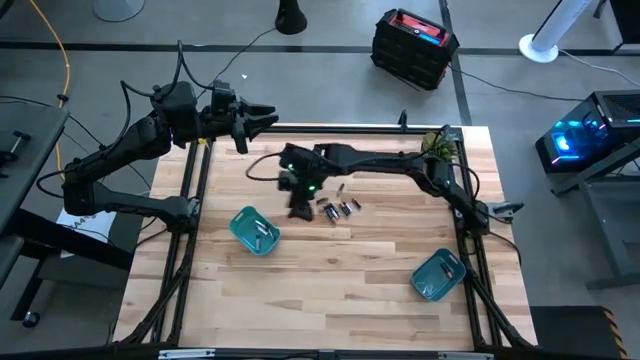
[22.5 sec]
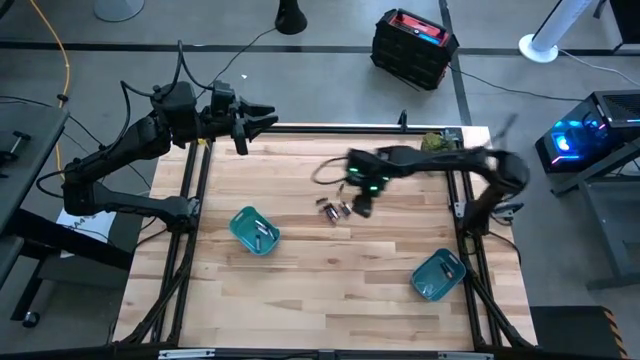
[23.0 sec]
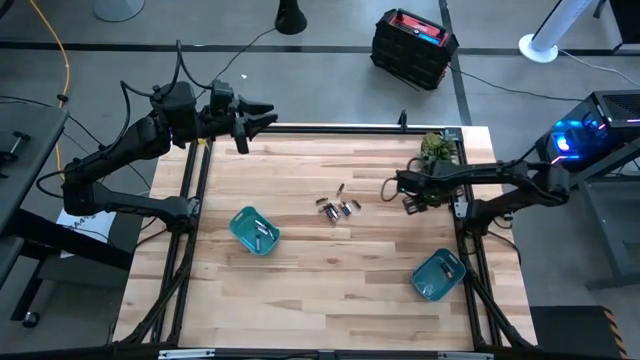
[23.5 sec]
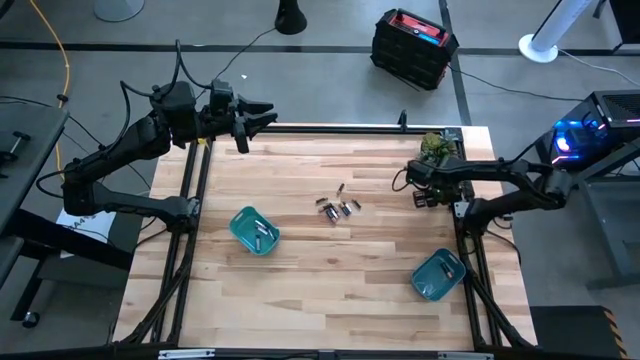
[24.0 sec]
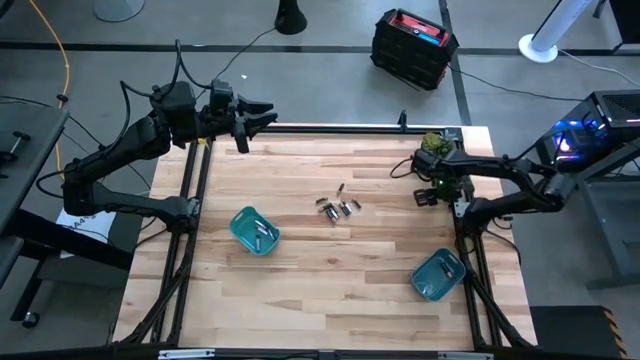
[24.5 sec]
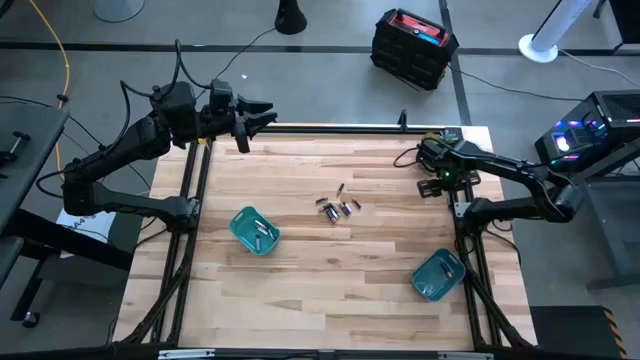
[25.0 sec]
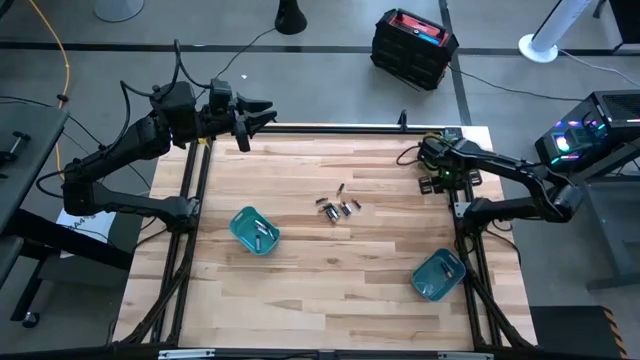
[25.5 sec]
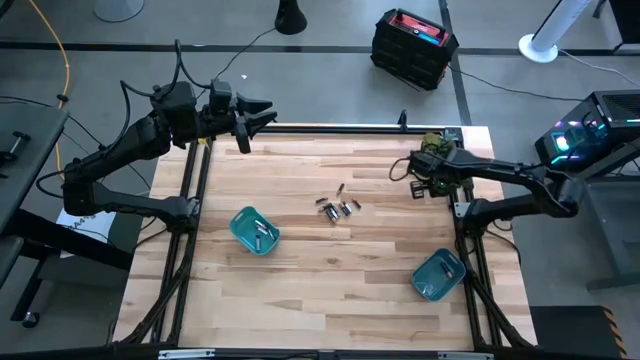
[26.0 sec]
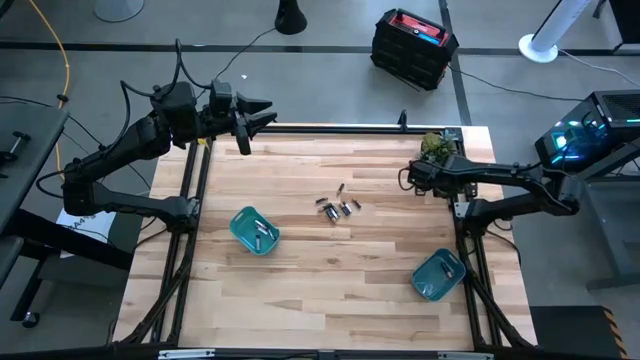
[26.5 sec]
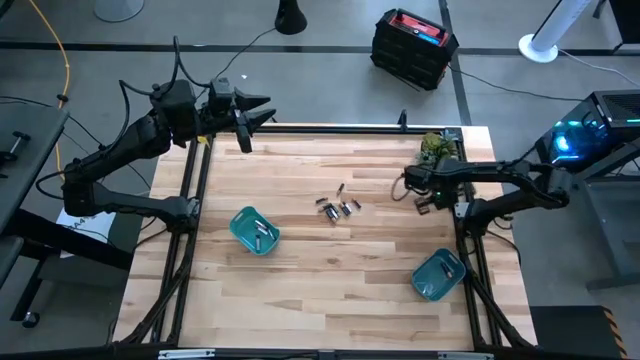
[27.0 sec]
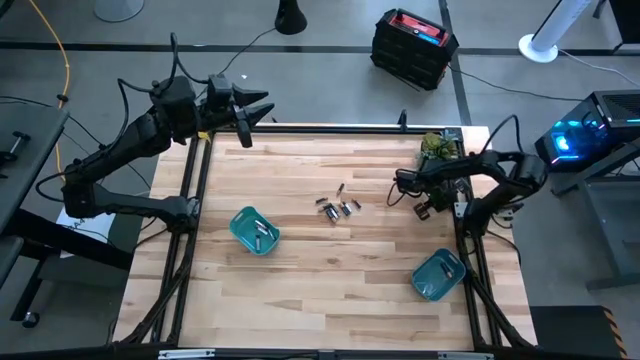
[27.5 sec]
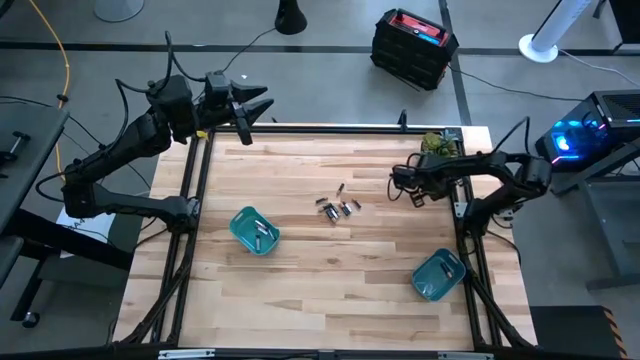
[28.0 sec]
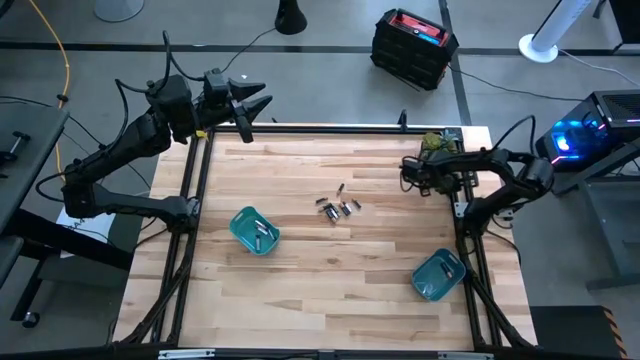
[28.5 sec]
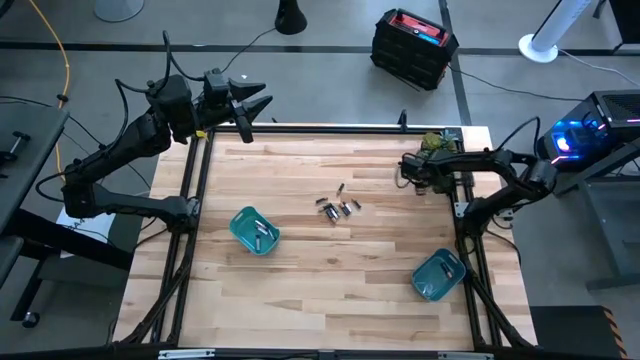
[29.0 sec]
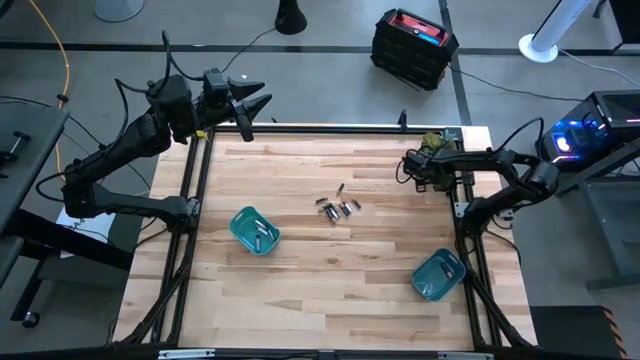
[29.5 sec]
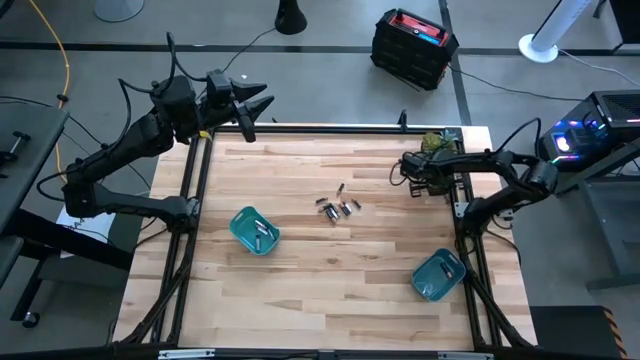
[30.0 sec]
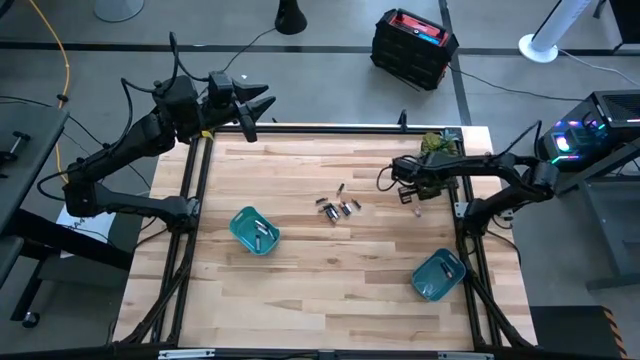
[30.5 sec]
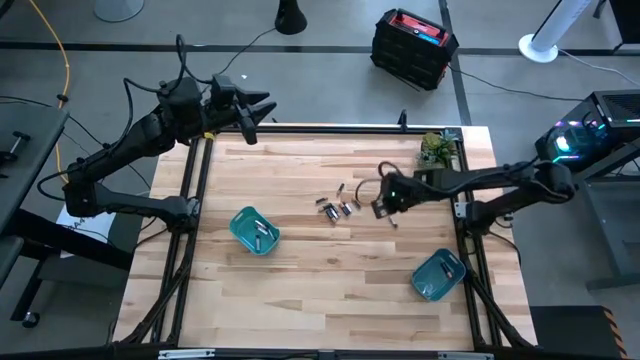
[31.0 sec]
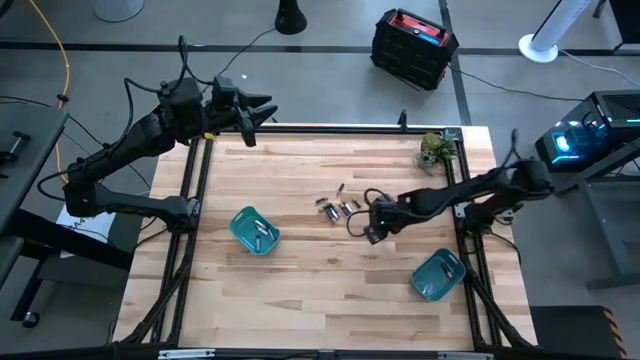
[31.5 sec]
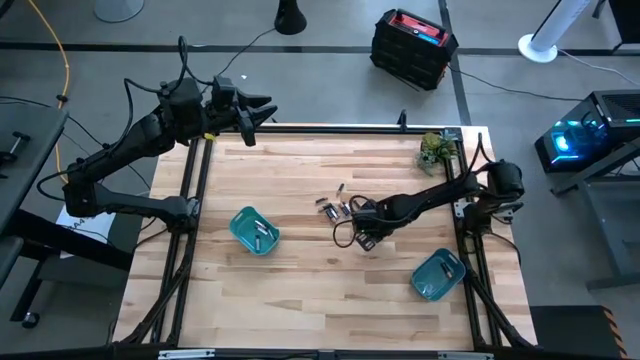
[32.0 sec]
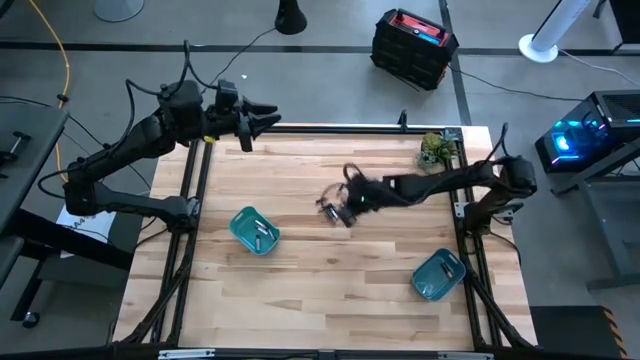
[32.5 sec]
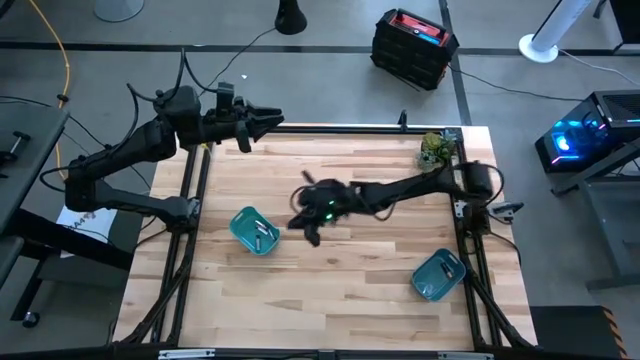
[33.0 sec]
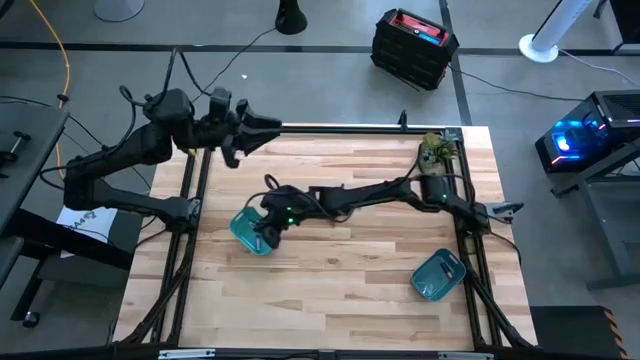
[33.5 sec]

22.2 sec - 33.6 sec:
Task: Sort batteries
Put the silver battery into the green bin

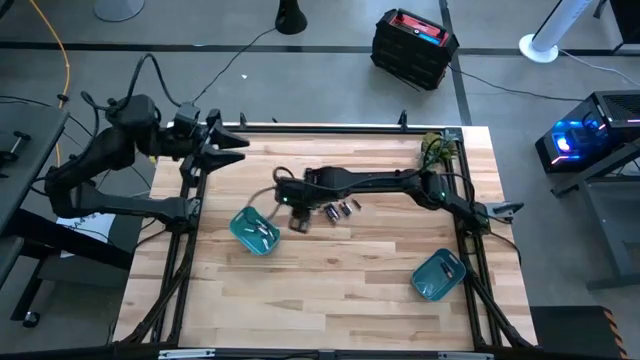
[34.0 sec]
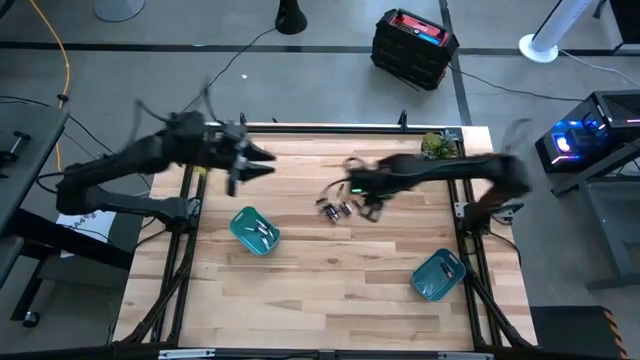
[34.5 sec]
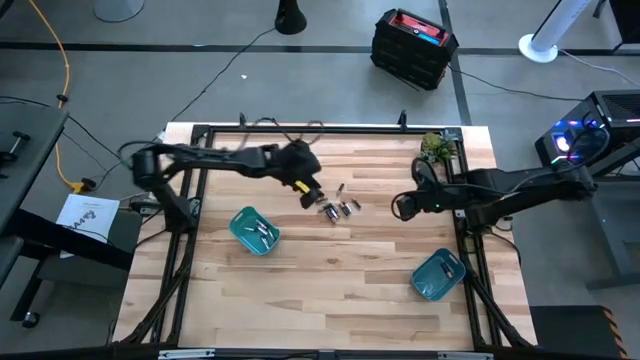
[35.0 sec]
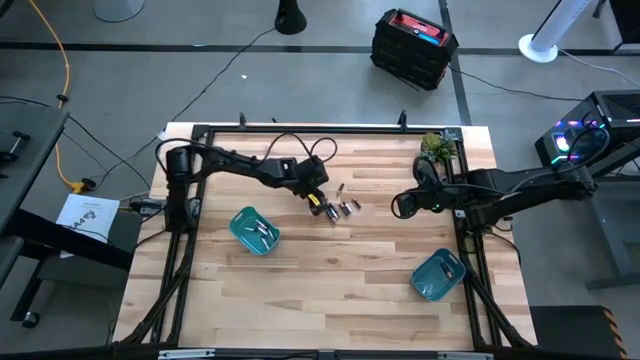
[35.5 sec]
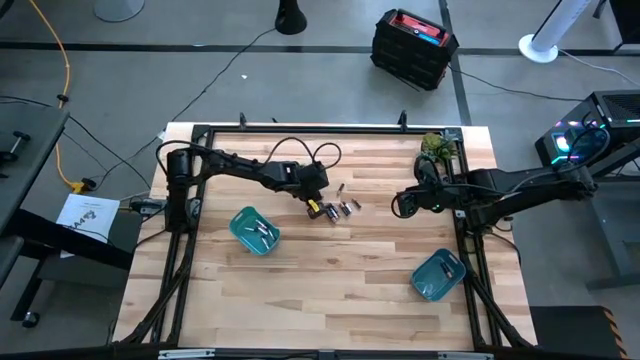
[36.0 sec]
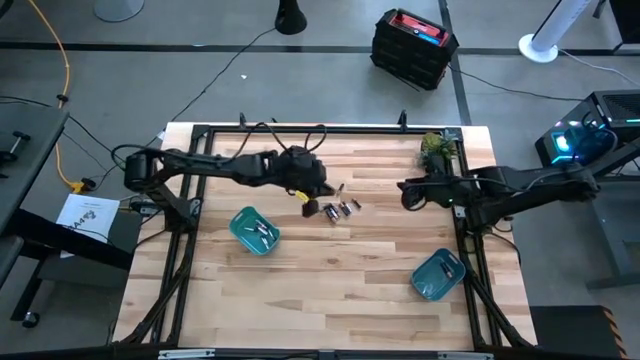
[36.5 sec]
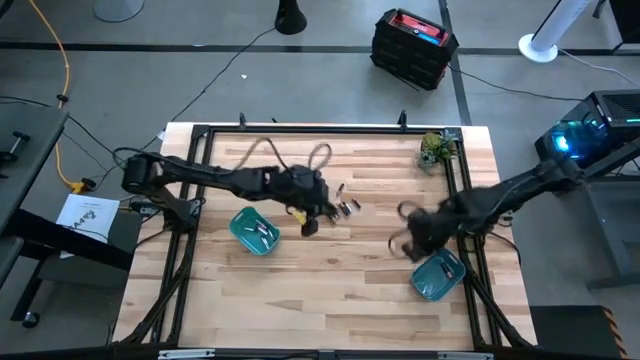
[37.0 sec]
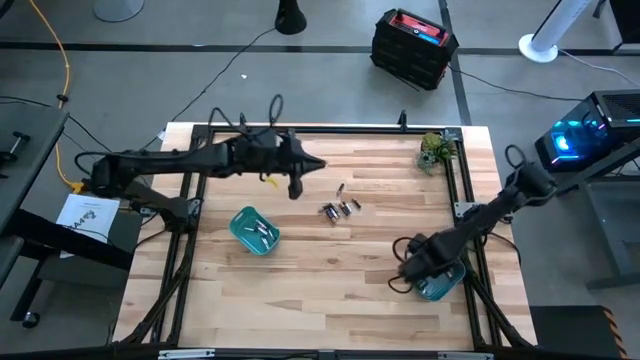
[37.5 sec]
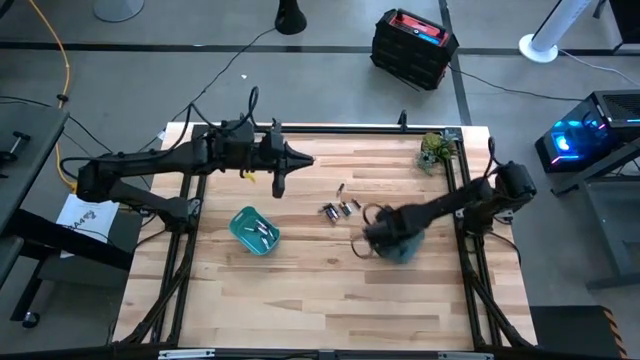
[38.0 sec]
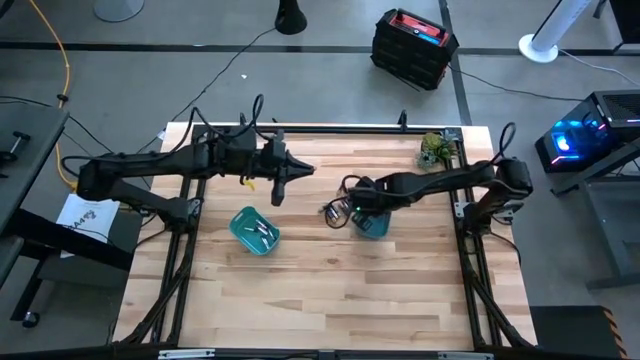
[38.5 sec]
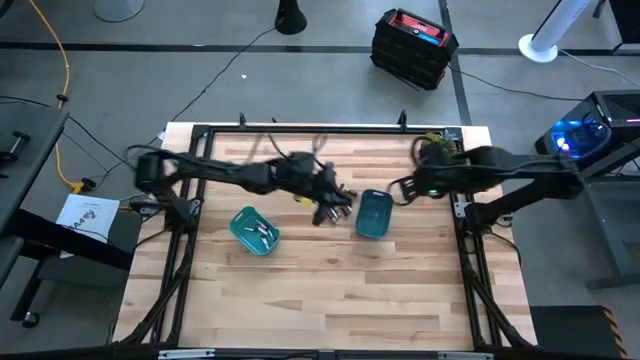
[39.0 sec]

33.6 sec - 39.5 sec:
Put the black battery into the blue bin

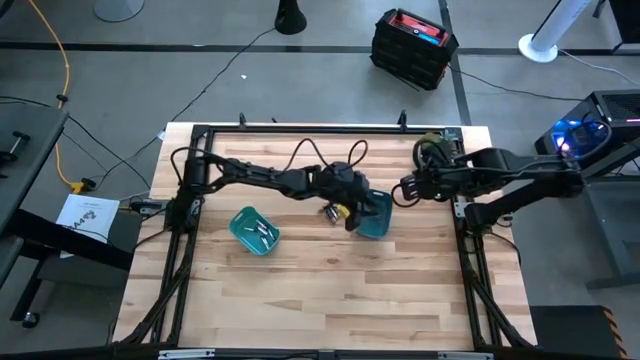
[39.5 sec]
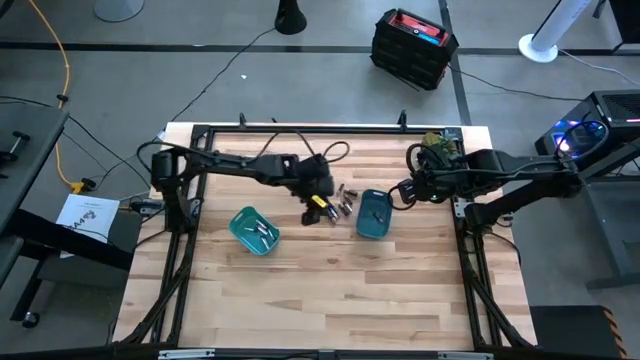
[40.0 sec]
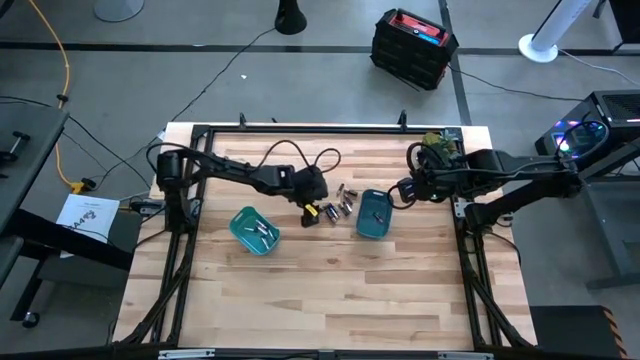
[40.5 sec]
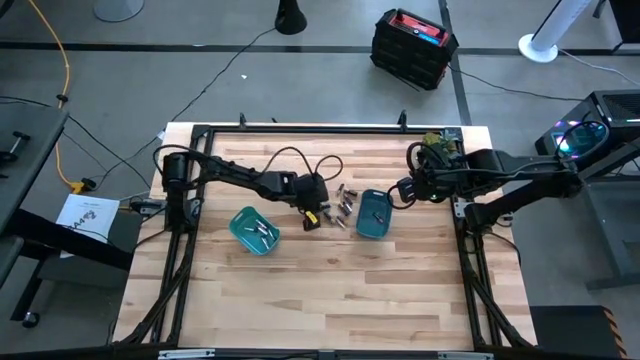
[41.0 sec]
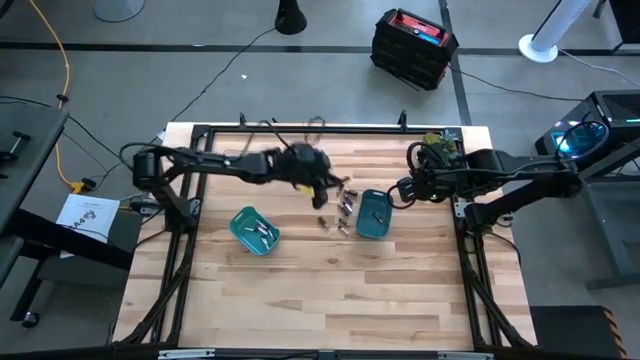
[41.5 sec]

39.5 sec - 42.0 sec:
Put the black battery into the blue bin

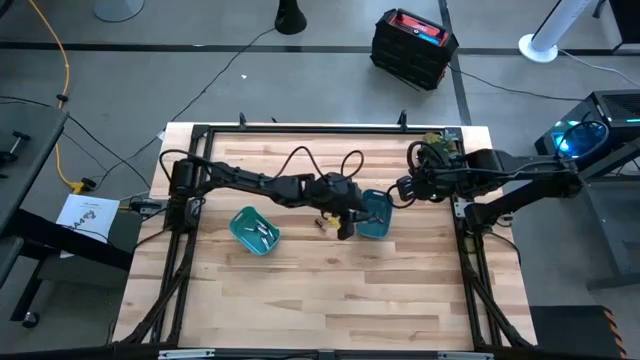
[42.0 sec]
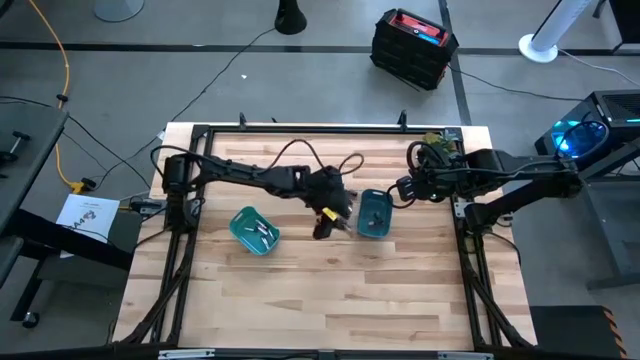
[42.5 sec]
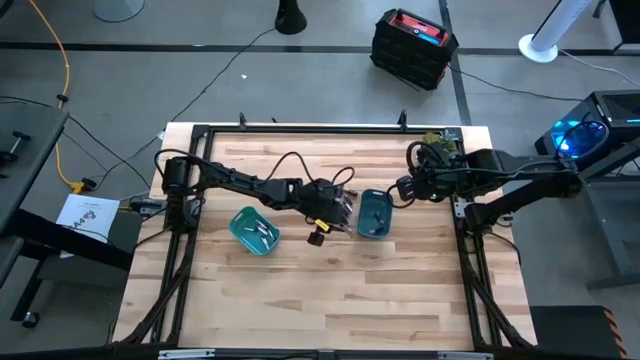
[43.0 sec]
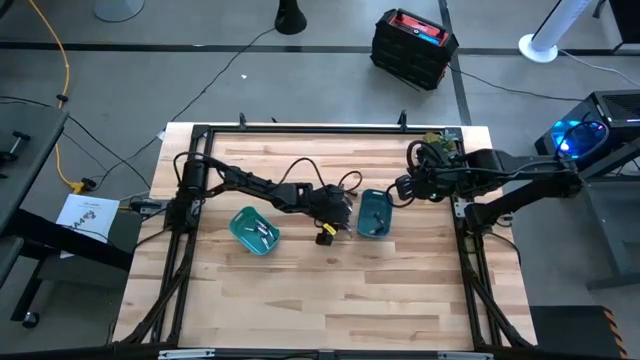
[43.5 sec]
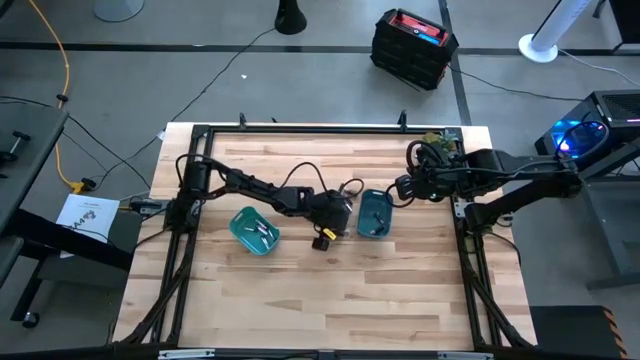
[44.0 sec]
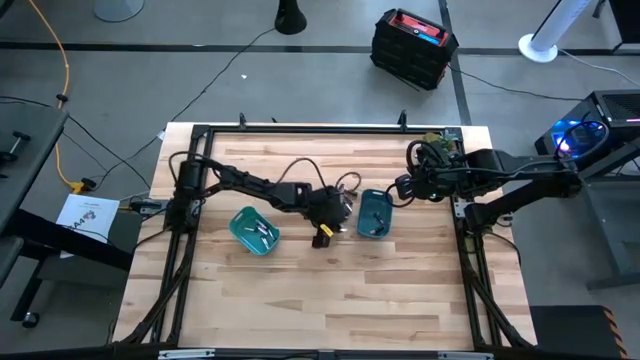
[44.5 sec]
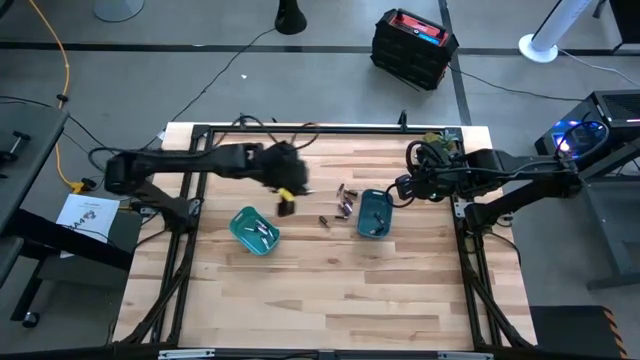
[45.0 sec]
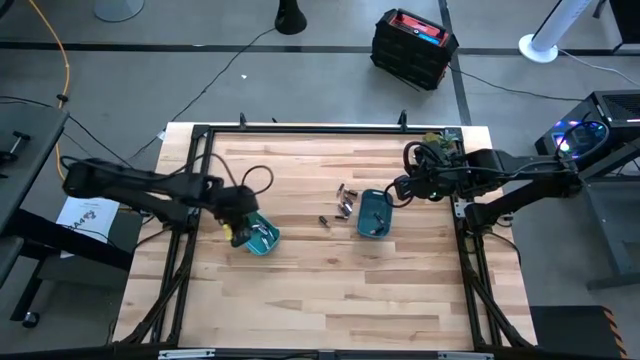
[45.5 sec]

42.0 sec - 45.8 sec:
Put the silver battery into the green bin
